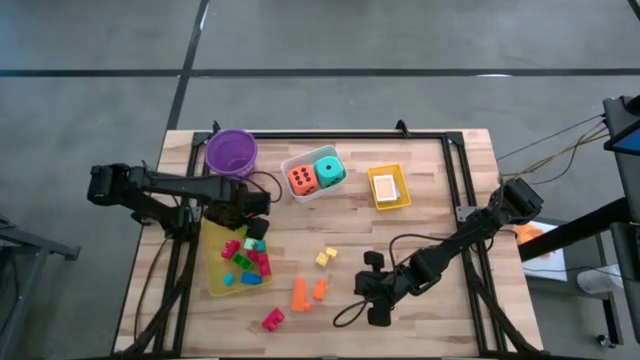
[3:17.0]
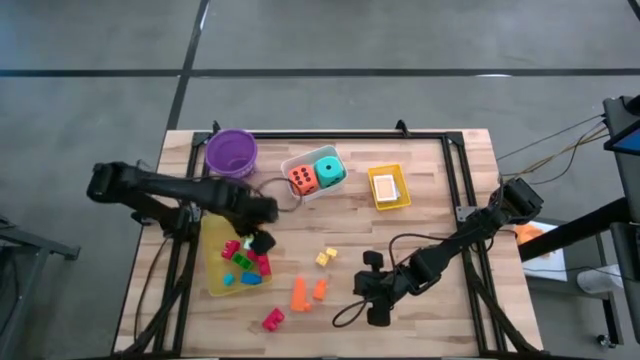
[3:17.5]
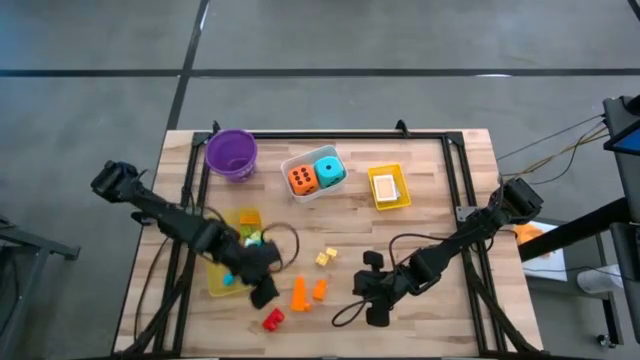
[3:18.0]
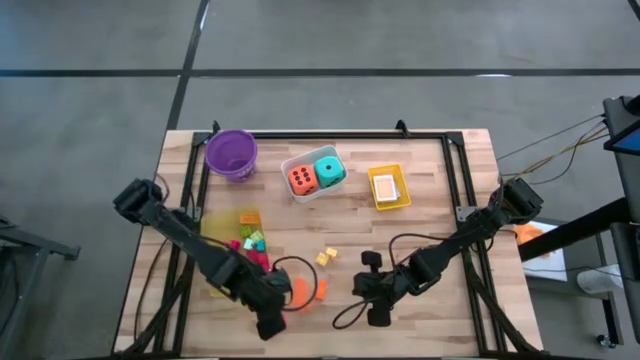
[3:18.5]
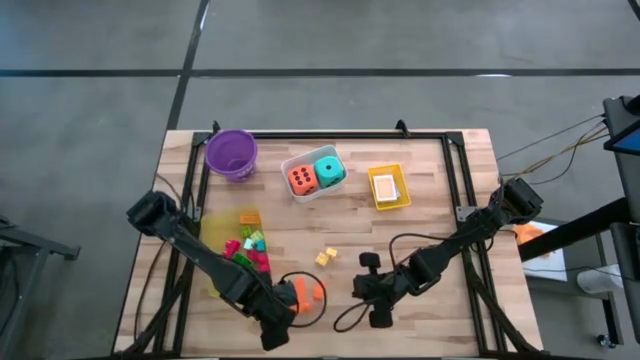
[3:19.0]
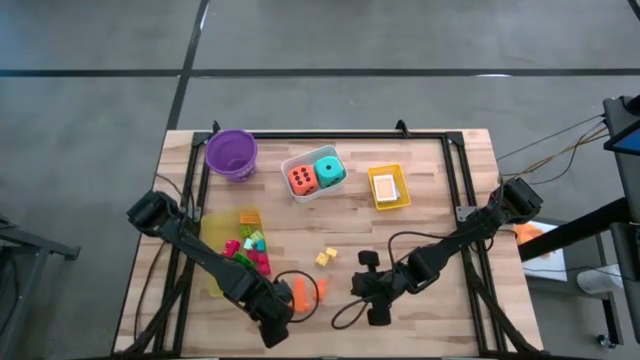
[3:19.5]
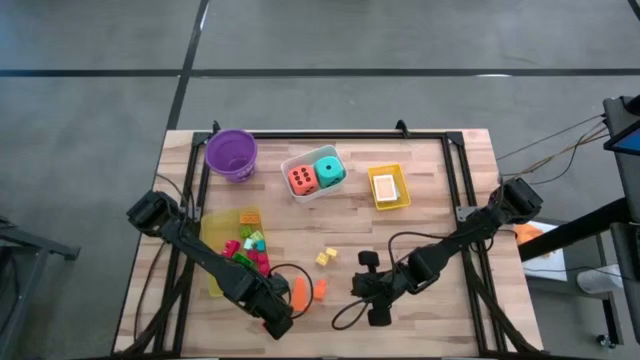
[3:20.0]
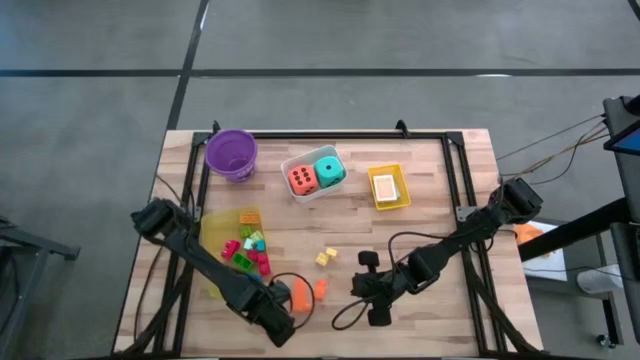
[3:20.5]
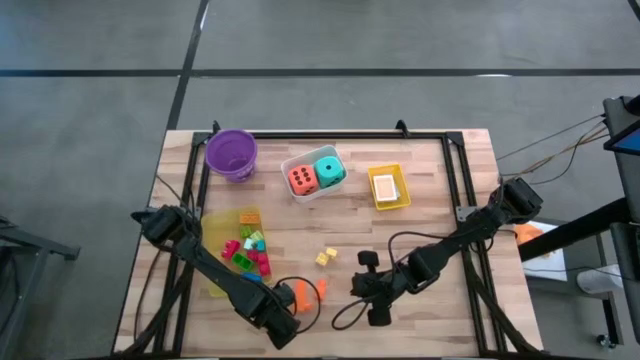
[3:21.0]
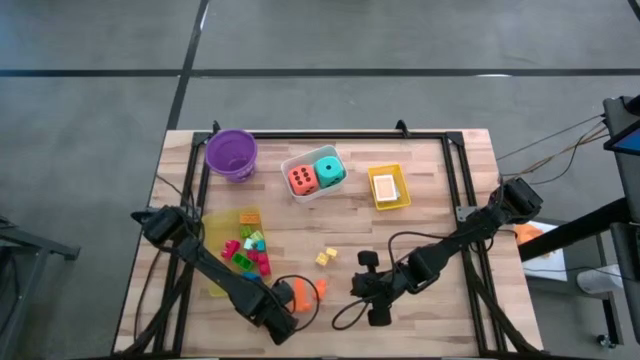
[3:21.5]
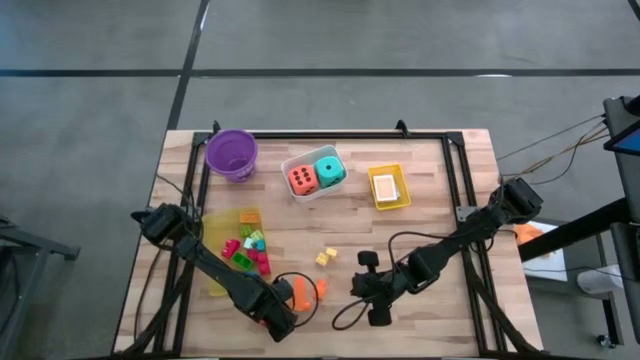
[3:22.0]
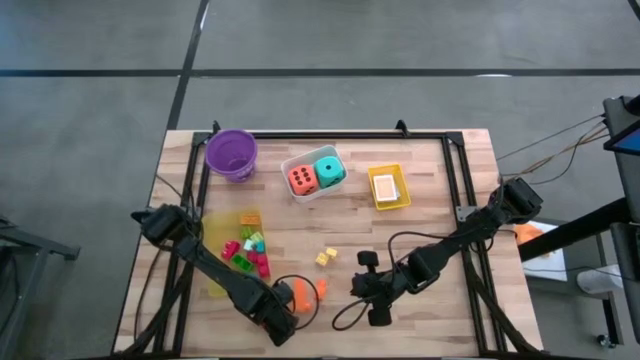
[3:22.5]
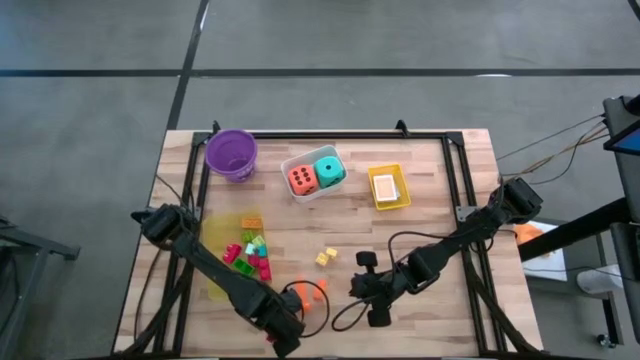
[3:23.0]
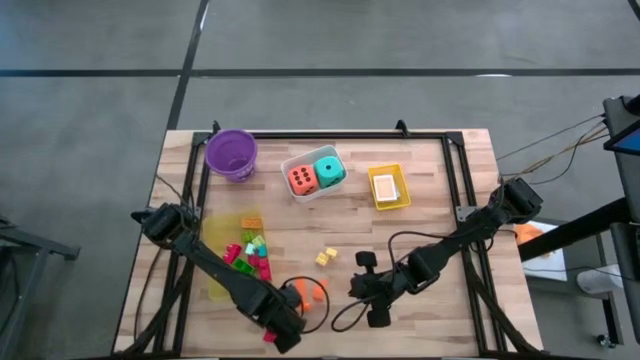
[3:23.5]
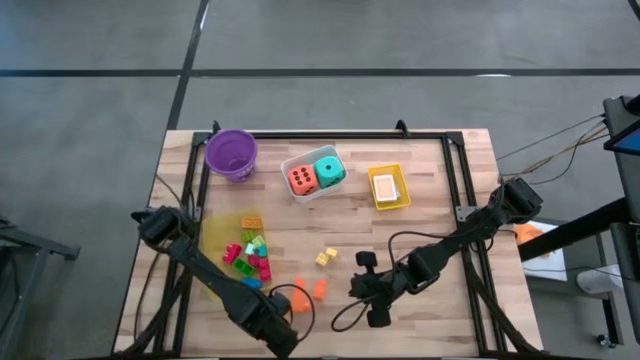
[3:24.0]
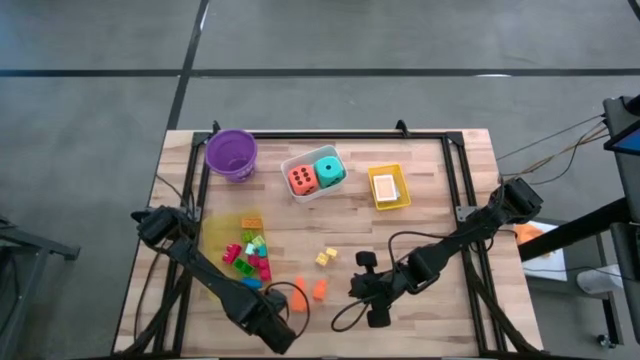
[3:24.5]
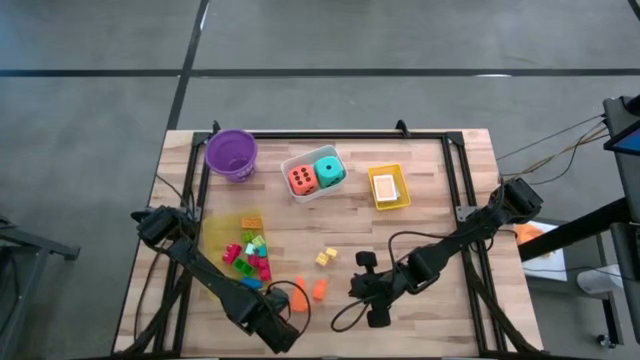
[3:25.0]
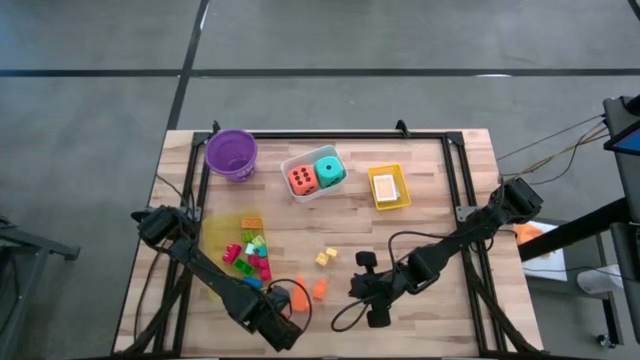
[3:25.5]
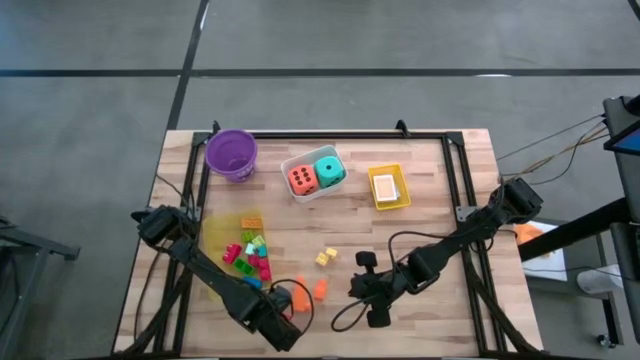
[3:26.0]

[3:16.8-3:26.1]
Task: Pick & Place Toys
Put the red game piece into the light yellow bin

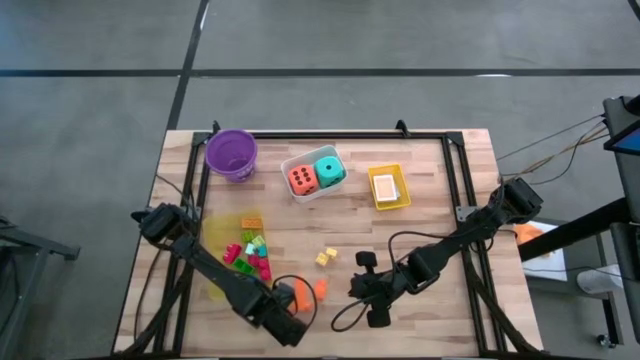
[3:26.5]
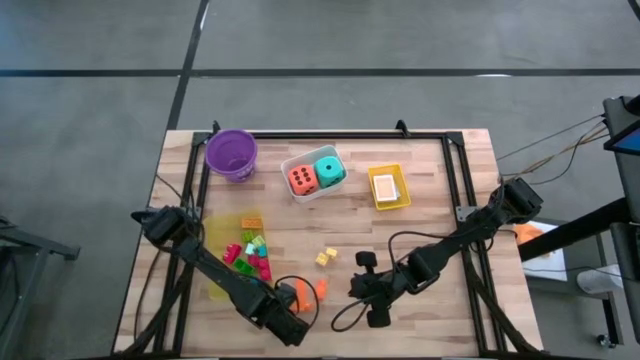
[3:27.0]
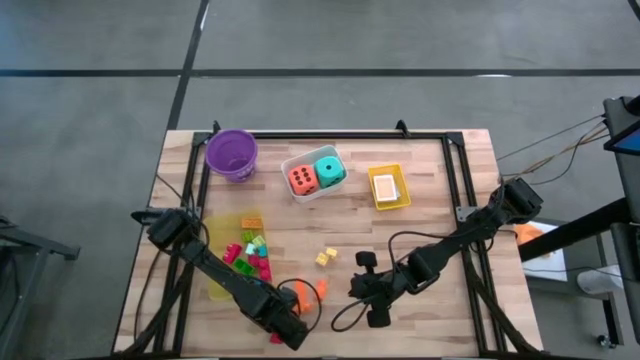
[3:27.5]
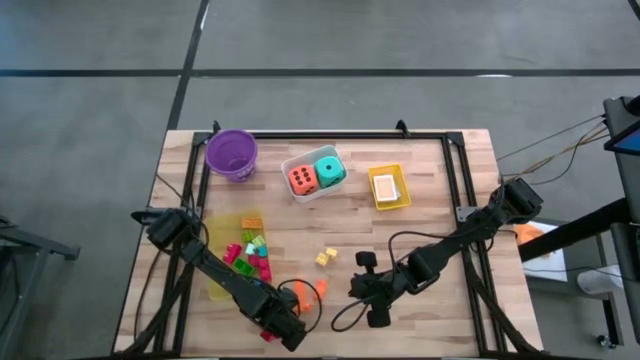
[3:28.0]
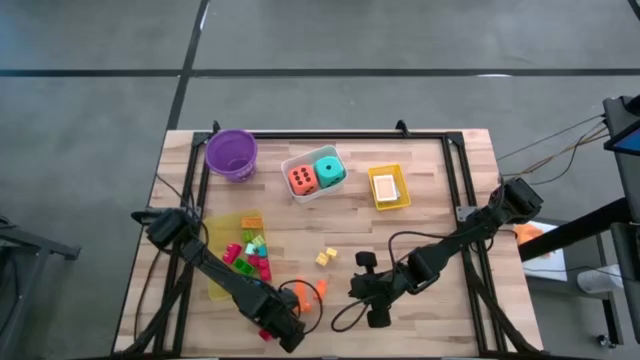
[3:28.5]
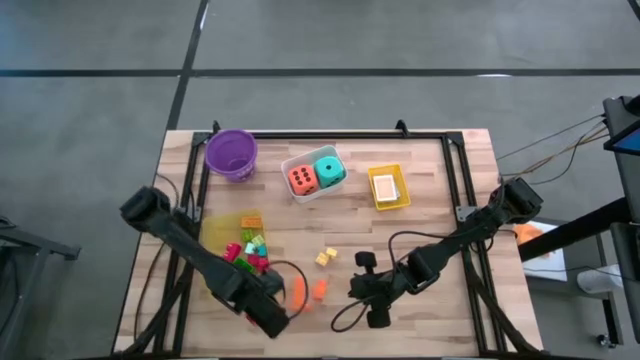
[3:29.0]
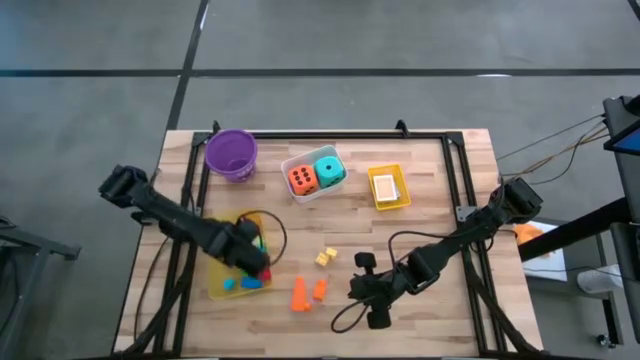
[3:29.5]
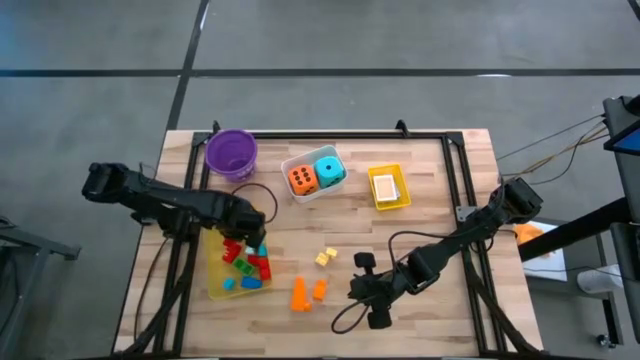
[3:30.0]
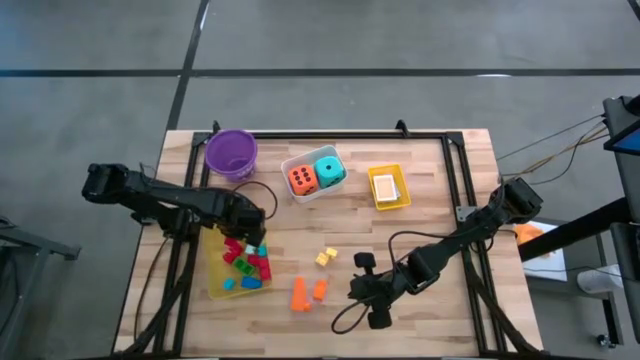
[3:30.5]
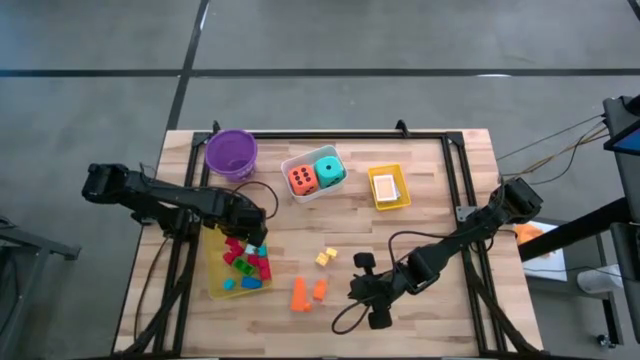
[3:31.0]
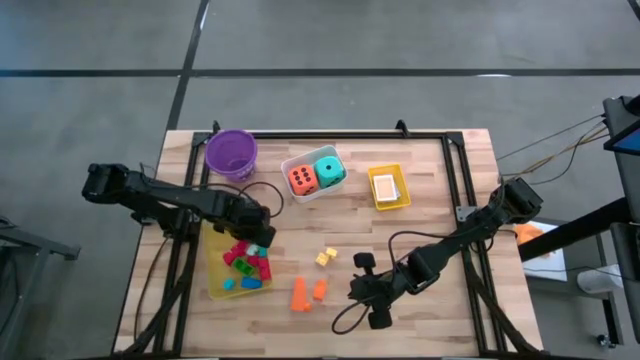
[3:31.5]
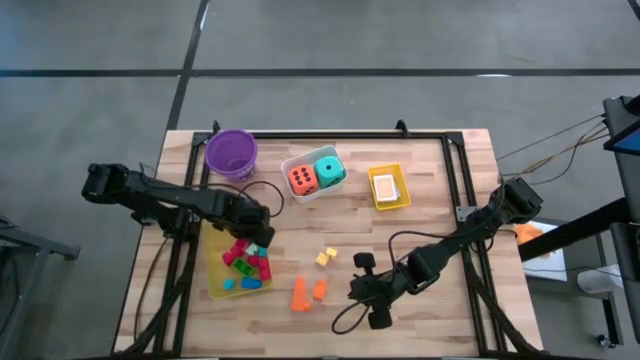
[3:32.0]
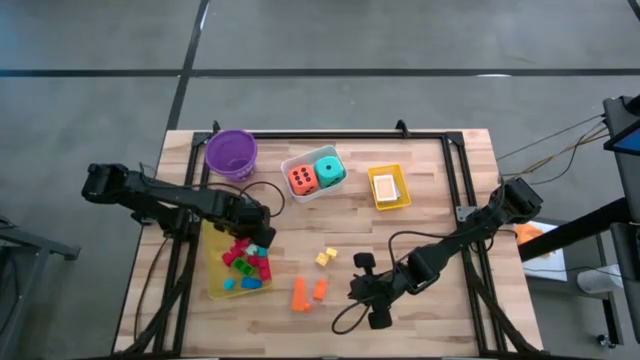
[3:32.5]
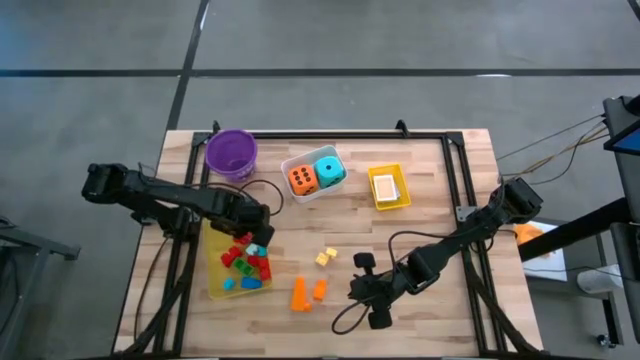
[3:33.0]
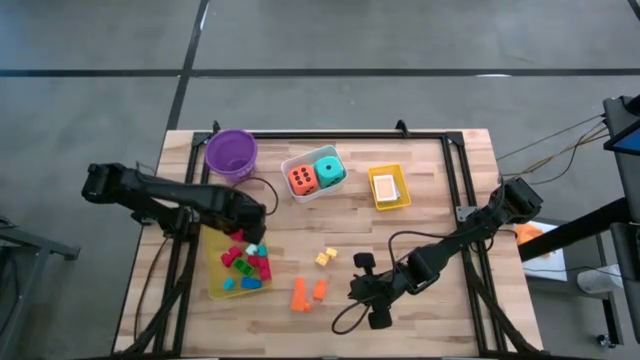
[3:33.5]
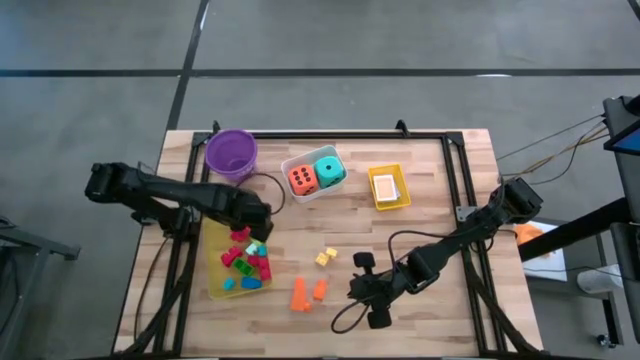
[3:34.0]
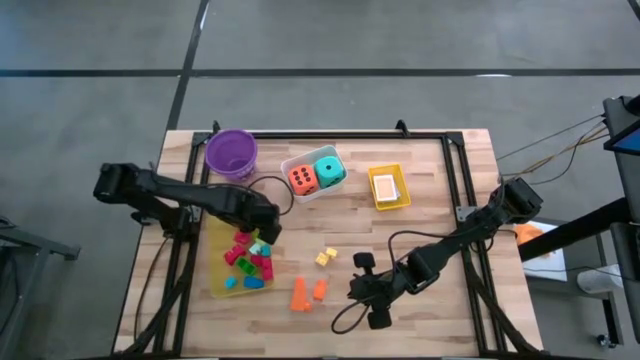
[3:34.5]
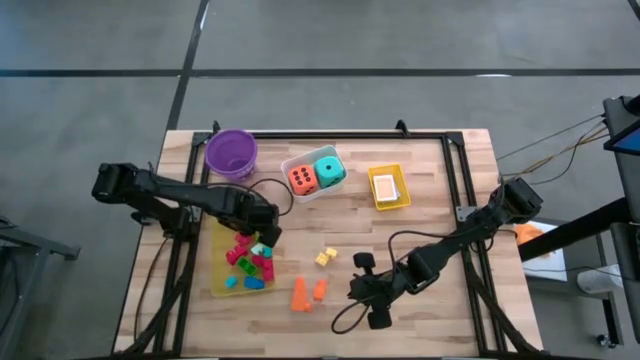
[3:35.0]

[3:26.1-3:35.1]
Put the red game piece into the light yellow bin

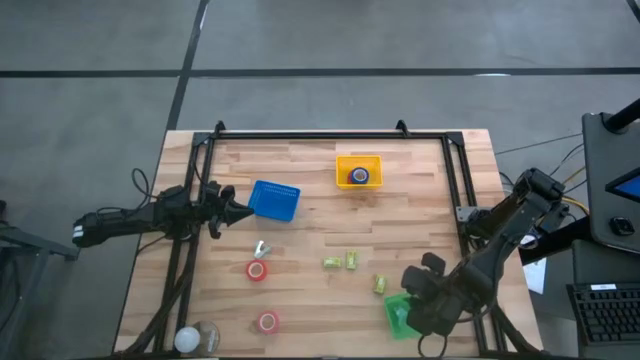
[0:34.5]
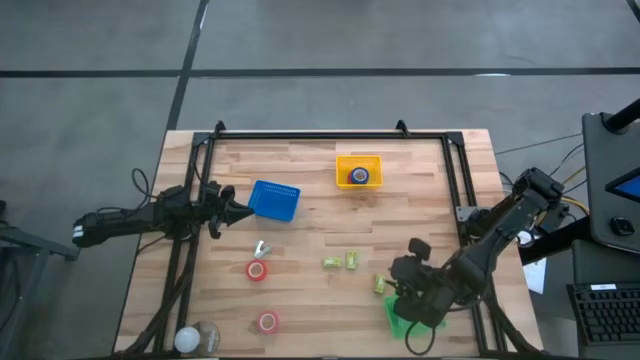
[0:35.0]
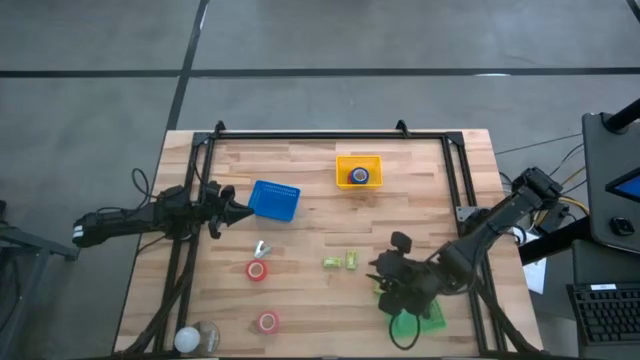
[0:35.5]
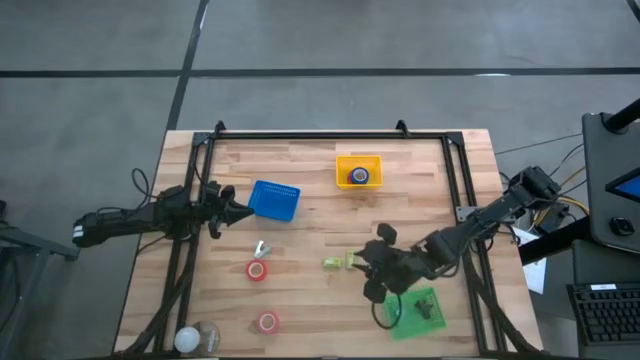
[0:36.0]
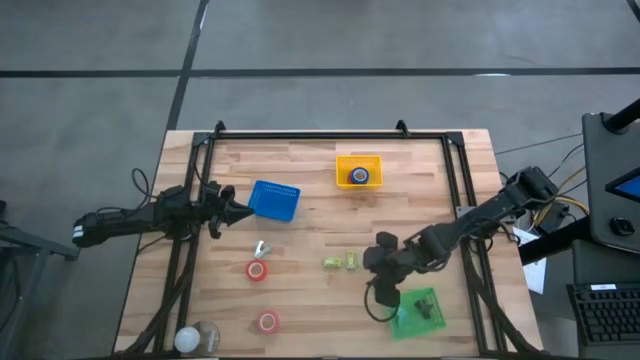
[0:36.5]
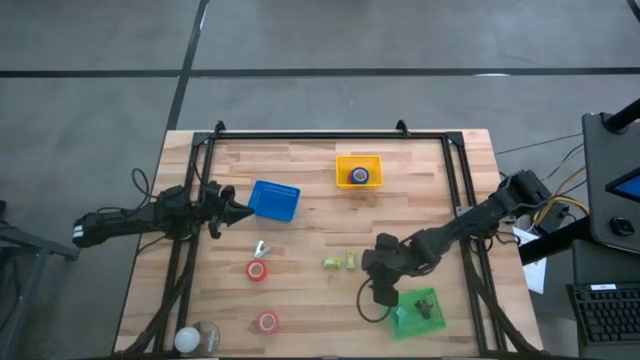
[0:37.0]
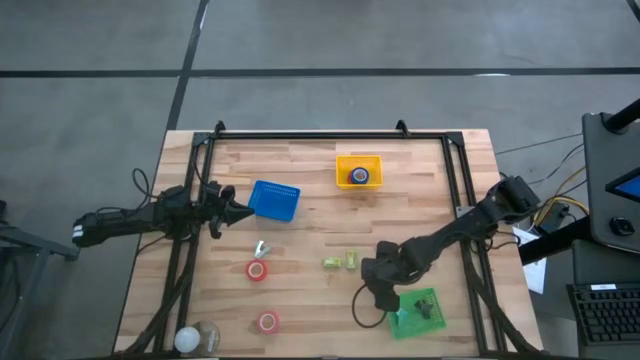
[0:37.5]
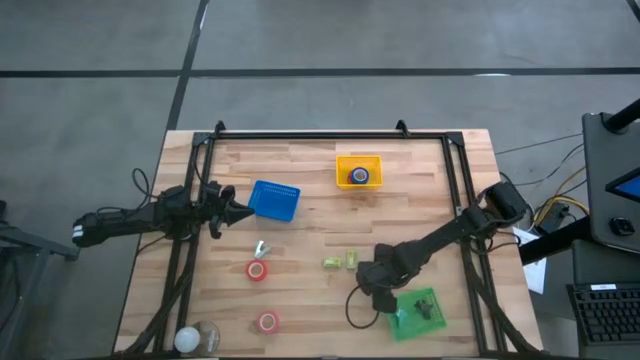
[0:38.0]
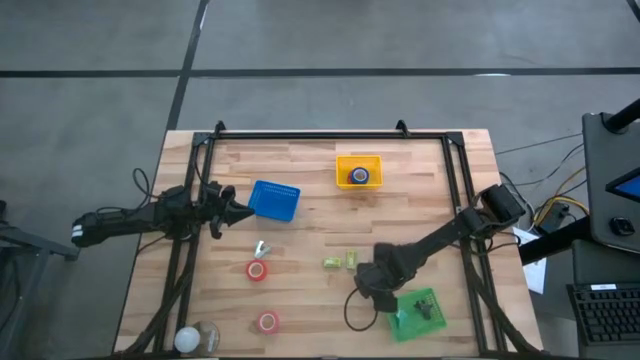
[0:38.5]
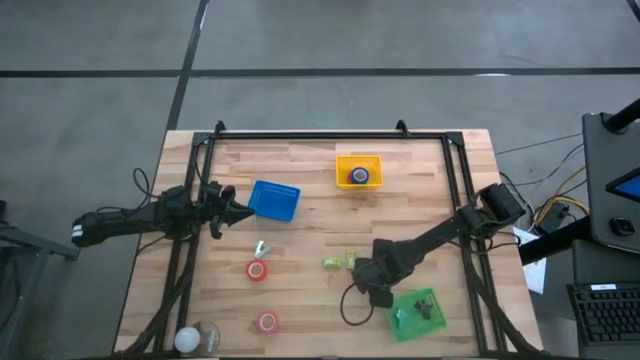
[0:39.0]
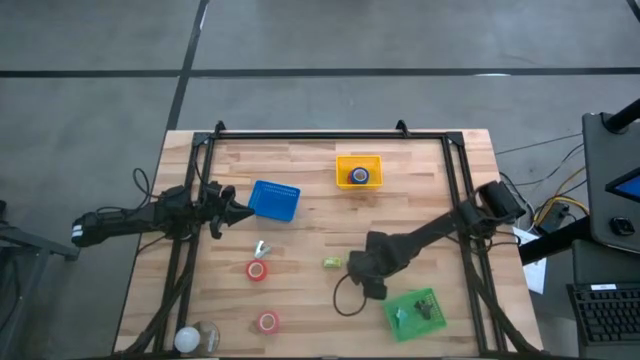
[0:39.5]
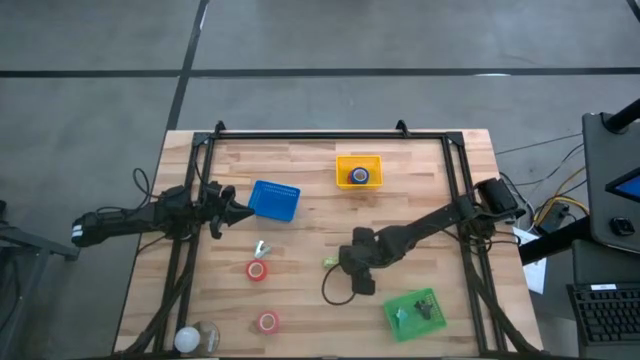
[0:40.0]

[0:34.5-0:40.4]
Task: Pick and place Stapler, Stapler remover, tape
Put the right green stapler pin box into the blue bin
